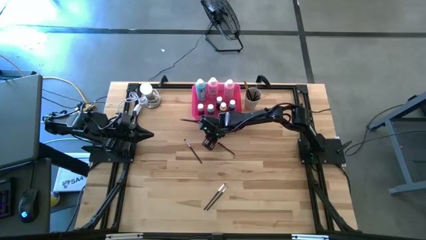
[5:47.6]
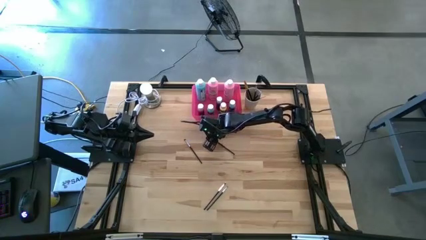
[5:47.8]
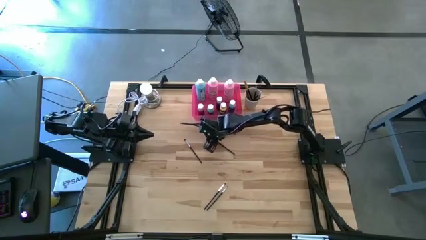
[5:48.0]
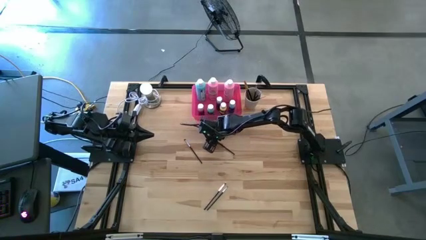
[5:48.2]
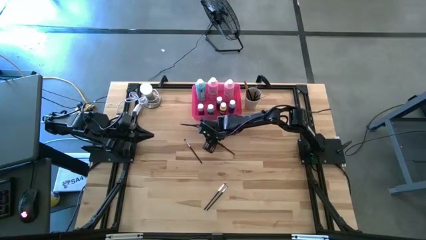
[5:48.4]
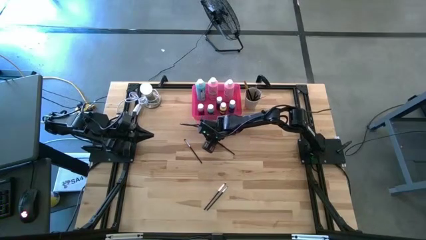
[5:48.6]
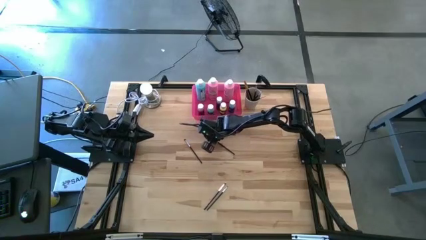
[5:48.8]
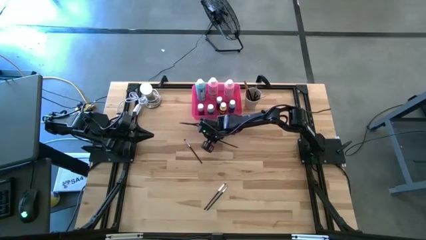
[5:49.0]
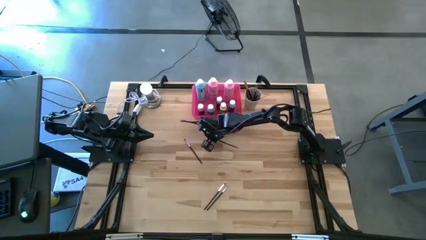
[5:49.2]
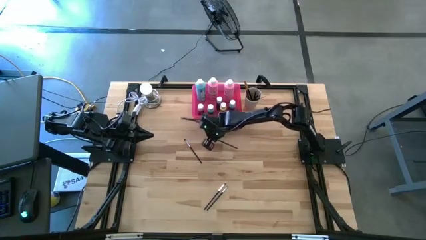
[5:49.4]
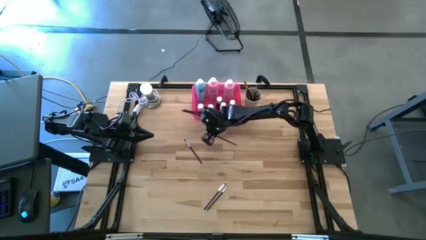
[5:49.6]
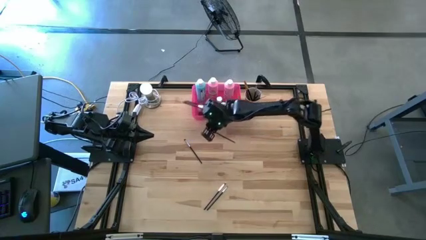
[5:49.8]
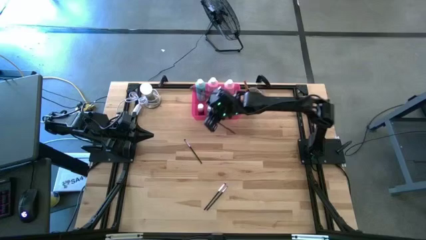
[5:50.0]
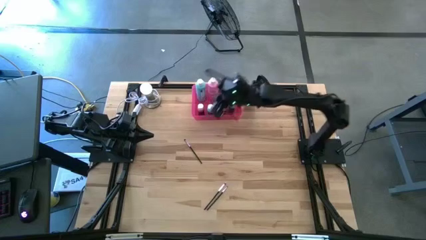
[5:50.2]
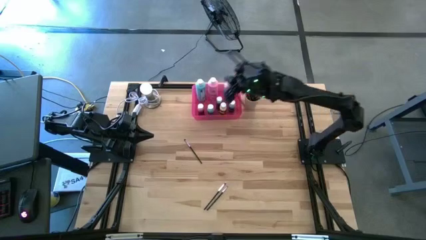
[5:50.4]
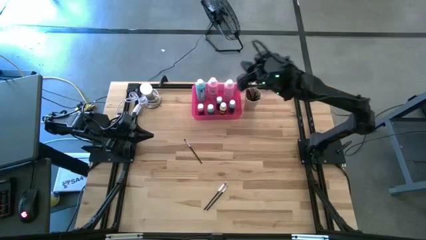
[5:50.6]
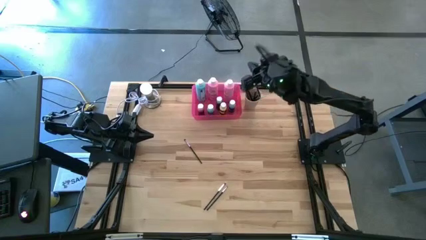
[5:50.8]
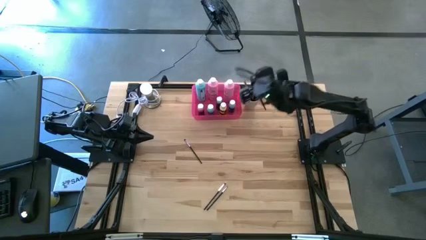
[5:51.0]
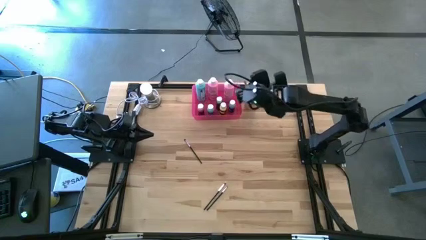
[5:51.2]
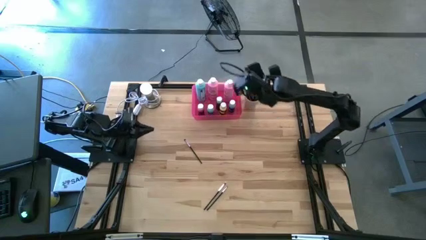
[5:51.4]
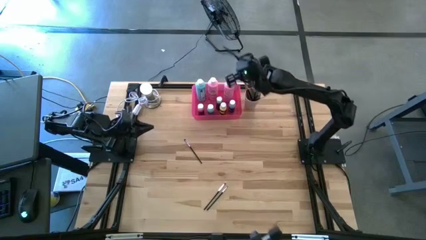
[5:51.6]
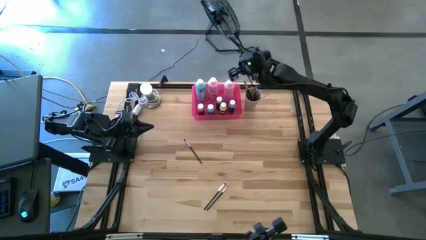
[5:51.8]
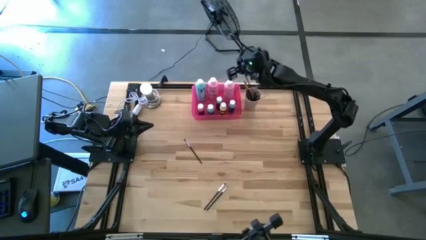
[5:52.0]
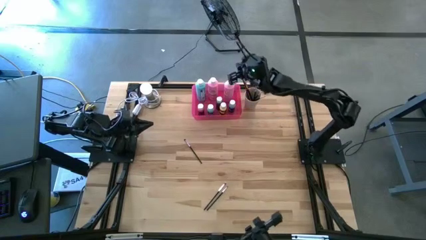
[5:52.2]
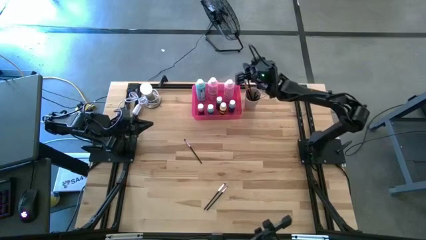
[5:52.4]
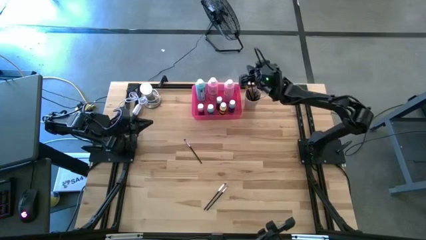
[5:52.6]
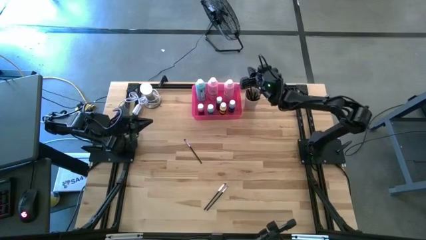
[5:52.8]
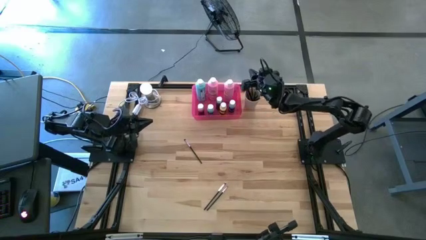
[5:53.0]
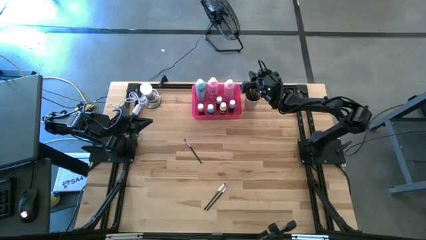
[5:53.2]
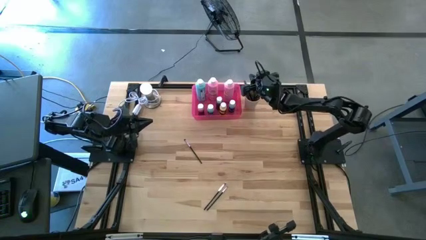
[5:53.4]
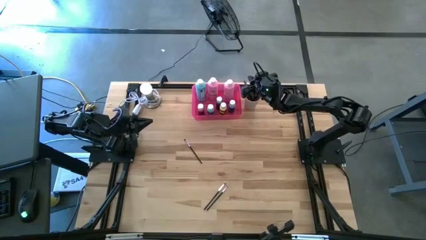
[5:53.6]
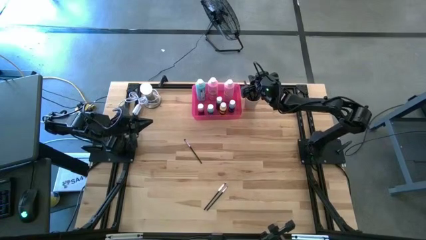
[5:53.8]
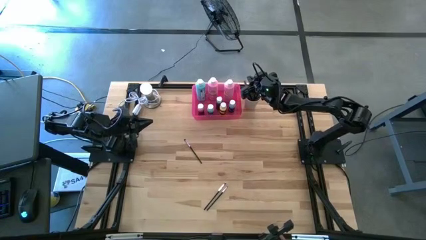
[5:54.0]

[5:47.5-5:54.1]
Task: Pick & Place Paint Supplies
Put the silver paintbrush into the white cup

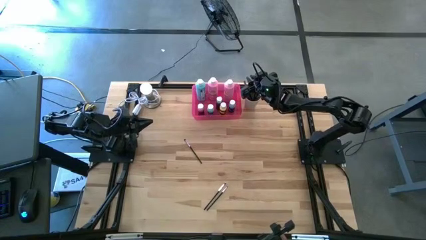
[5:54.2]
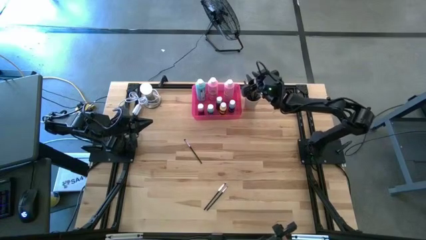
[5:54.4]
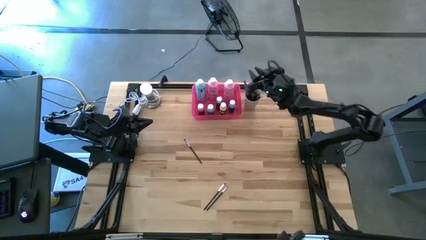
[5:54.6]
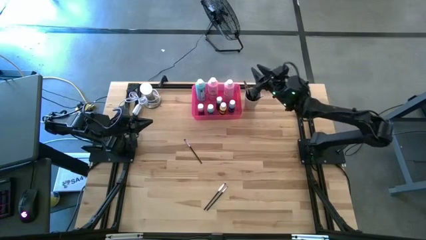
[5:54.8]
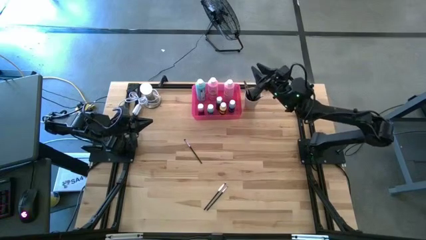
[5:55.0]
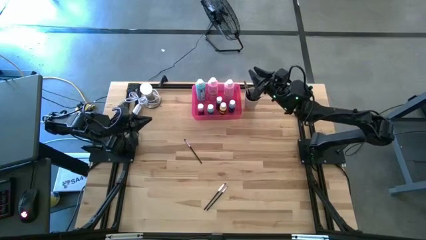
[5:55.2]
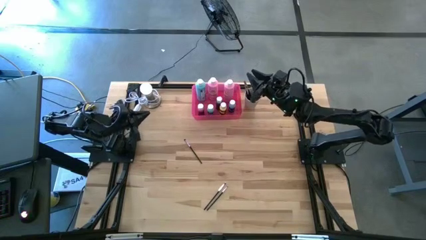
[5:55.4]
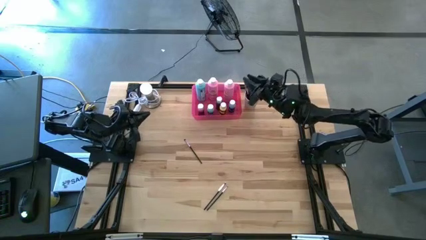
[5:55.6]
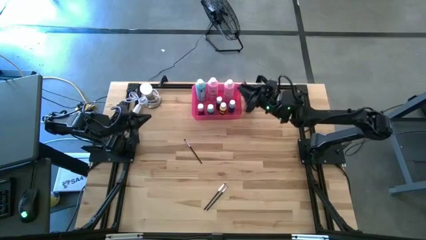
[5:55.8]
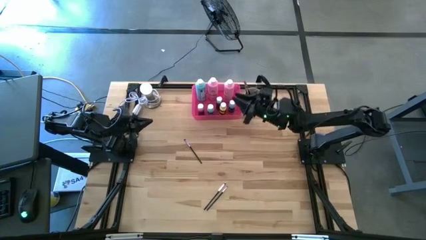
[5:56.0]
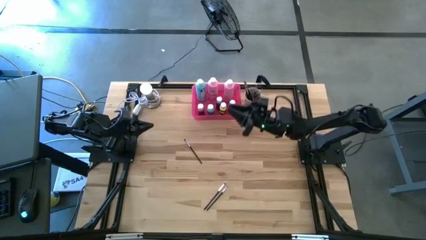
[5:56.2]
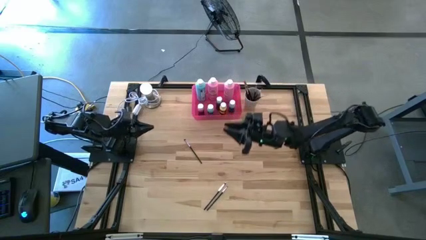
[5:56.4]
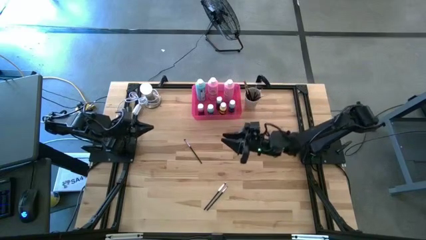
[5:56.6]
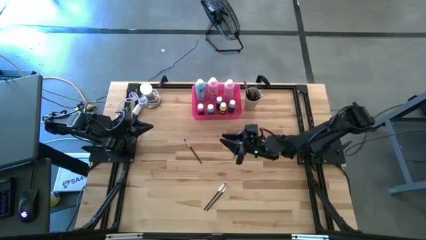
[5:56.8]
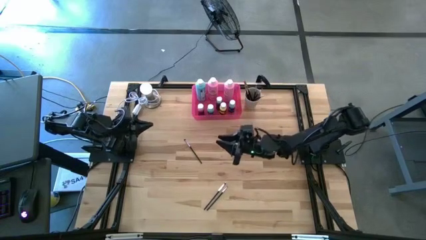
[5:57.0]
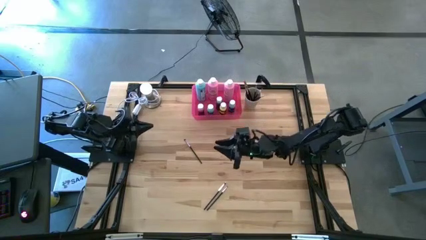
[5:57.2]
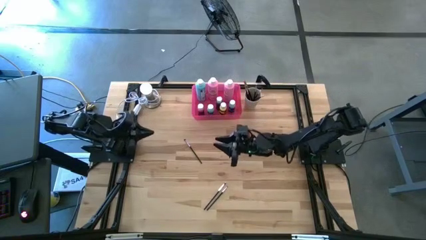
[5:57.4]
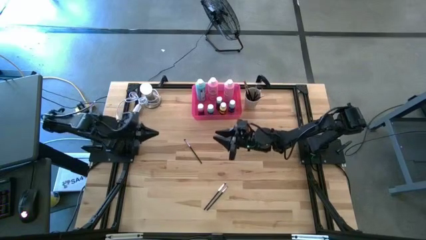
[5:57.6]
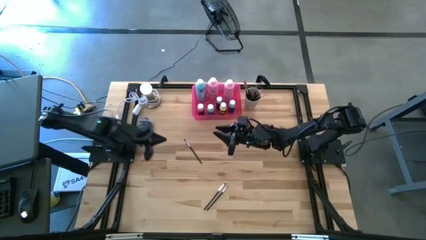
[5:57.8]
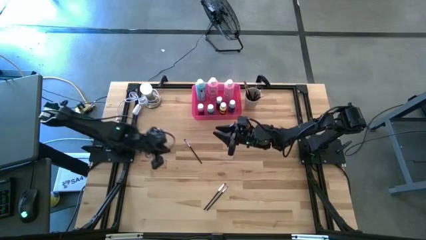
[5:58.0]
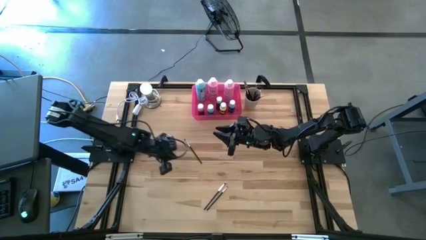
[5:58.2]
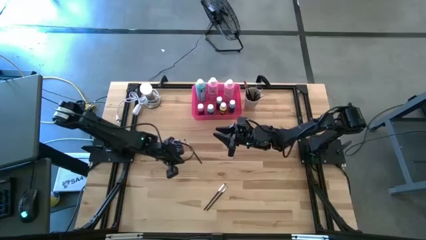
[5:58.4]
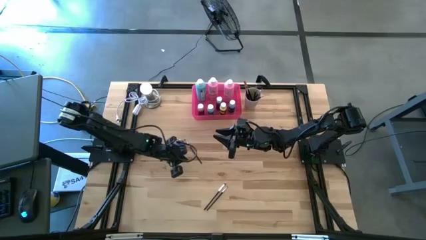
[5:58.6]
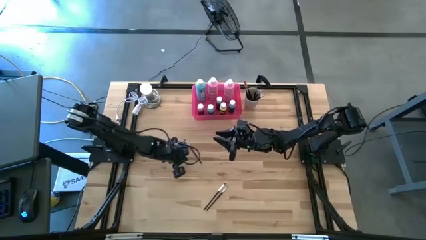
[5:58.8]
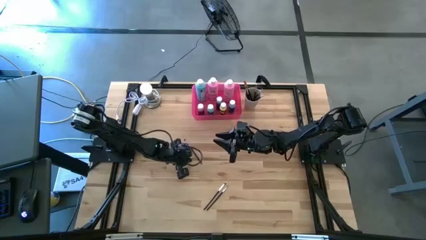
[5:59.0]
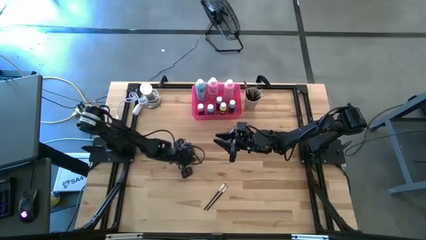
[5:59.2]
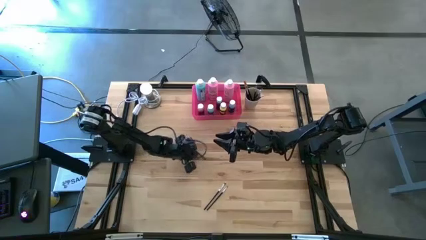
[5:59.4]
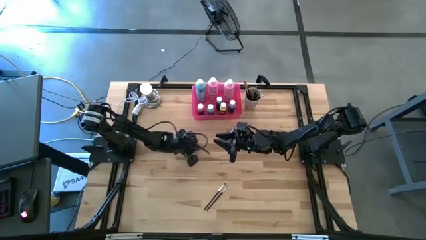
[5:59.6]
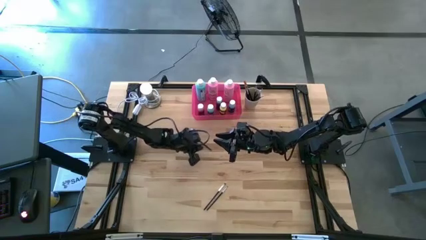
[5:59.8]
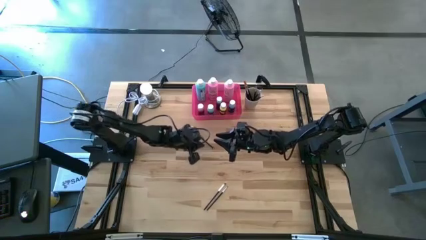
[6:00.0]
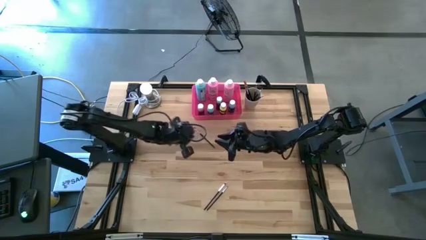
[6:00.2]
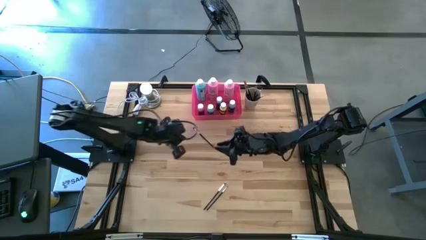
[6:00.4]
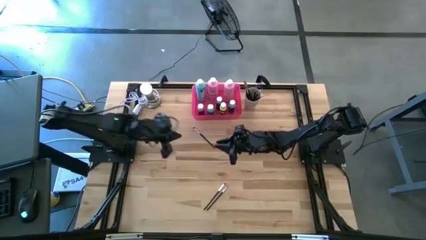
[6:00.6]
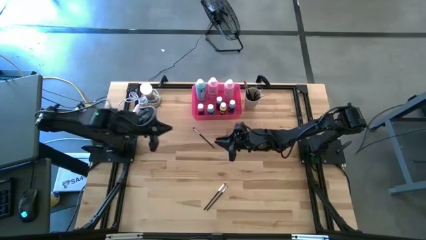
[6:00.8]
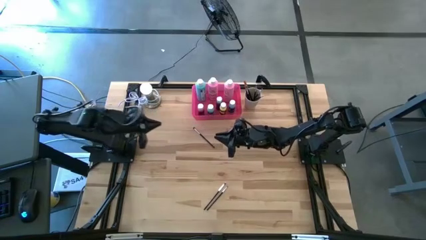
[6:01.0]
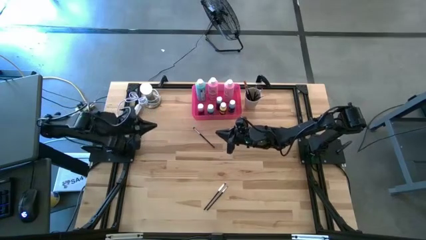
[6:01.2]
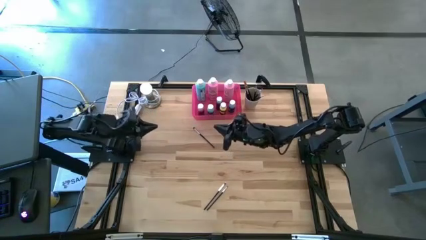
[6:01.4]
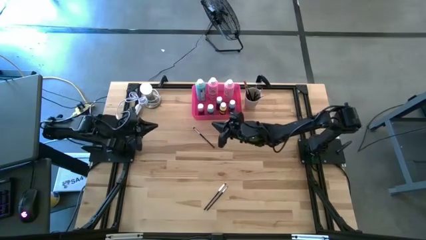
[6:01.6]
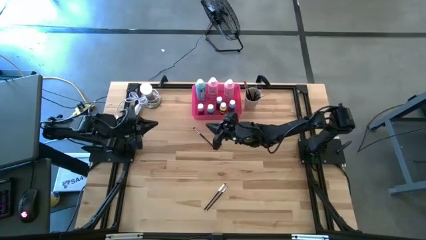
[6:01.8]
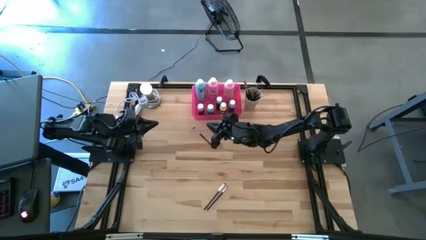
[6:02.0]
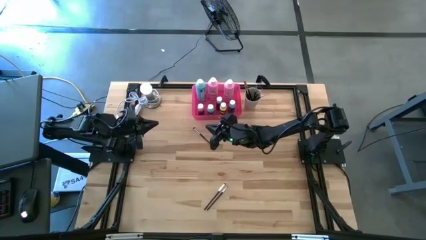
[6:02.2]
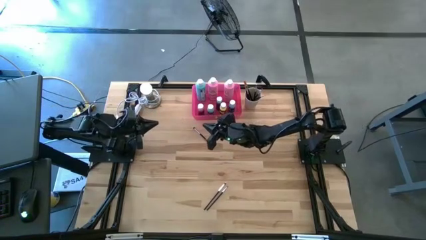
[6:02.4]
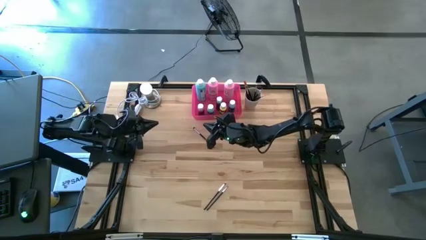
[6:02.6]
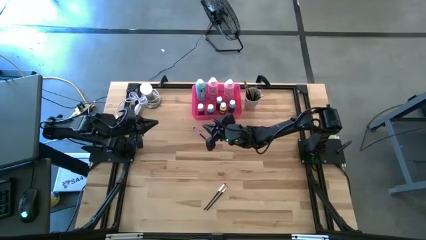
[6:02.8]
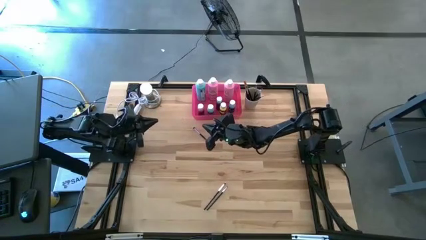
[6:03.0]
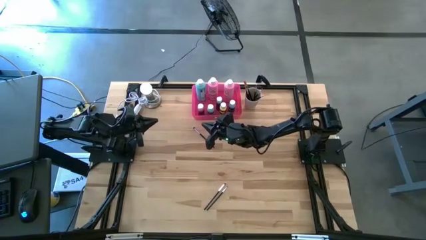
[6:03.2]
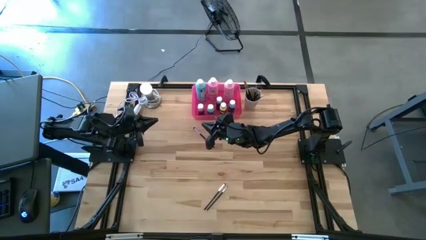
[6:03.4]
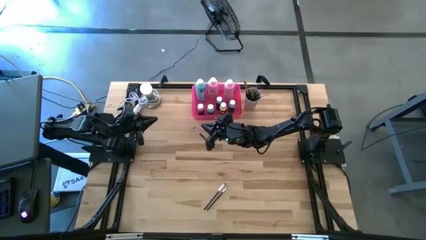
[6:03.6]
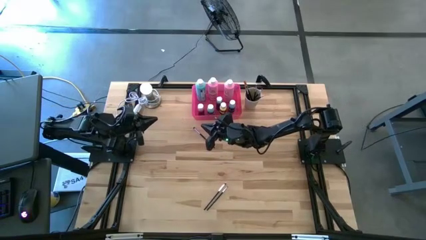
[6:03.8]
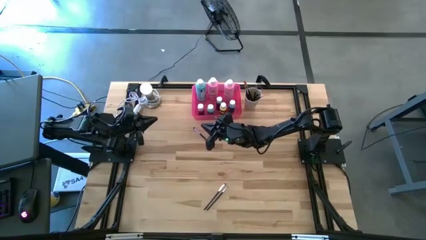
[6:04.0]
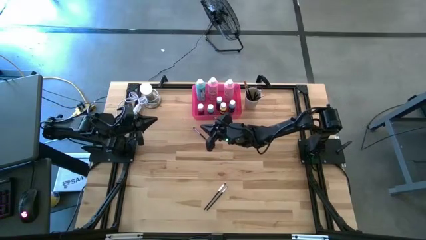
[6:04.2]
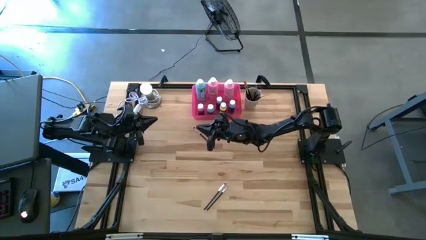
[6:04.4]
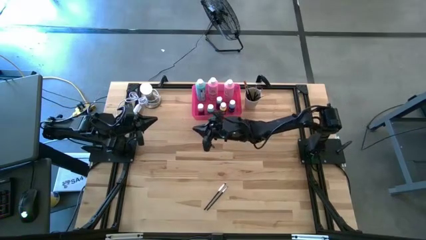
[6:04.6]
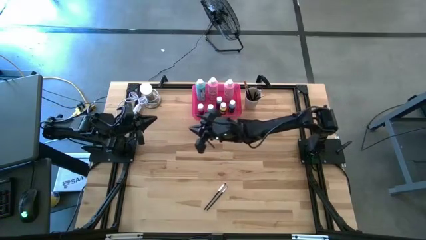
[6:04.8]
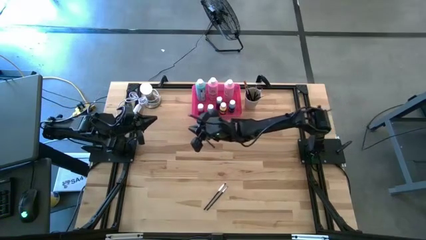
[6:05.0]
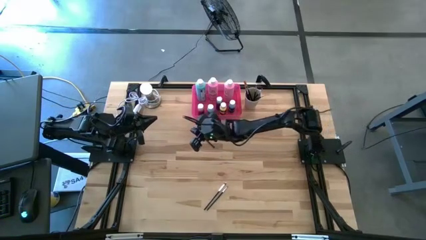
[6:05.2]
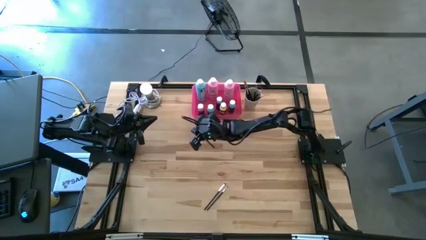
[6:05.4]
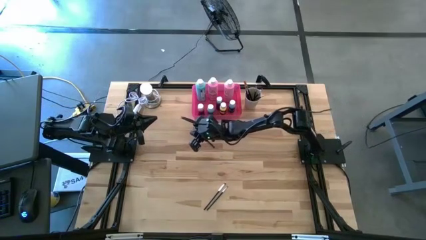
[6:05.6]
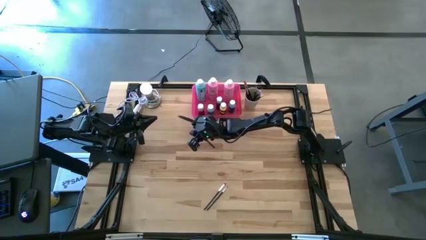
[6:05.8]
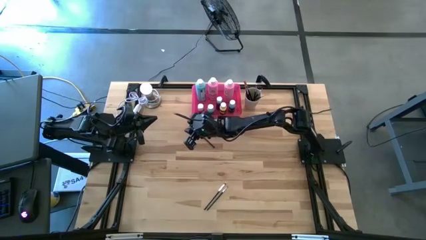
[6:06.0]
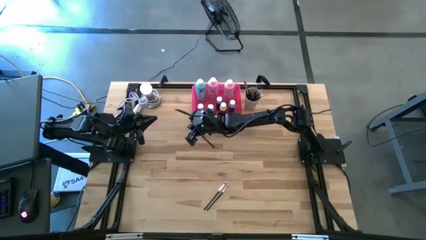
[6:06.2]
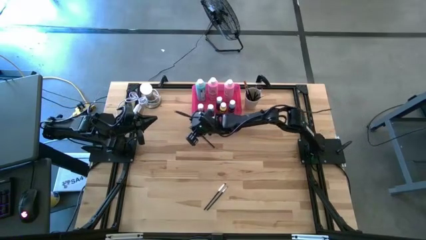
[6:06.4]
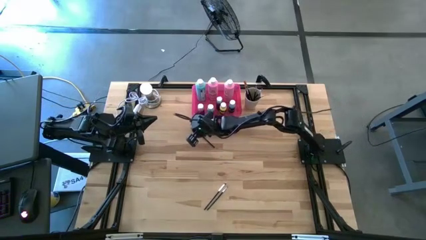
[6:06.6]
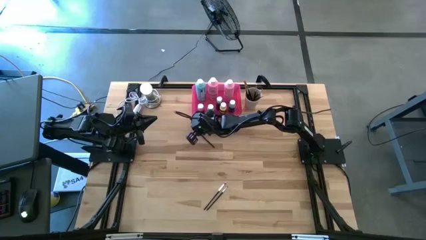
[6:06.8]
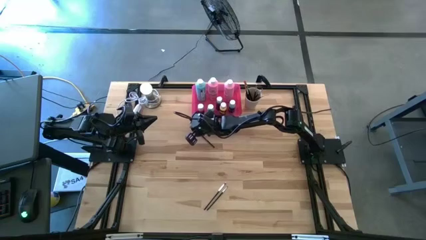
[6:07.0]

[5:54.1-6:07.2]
Put the silver paintbrush into the white cup
